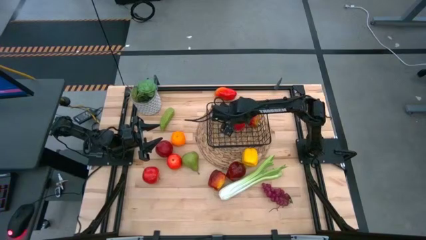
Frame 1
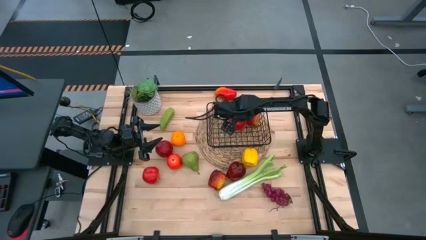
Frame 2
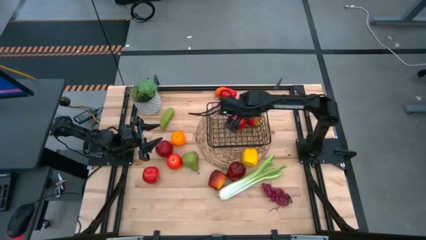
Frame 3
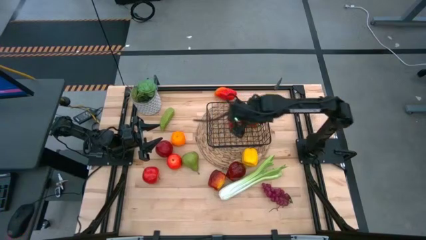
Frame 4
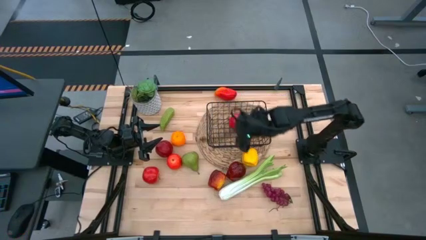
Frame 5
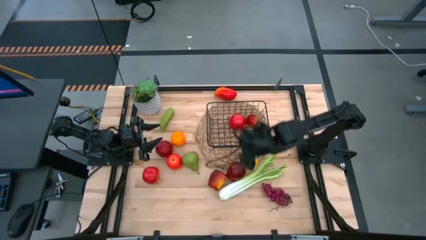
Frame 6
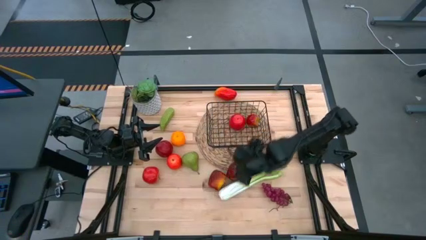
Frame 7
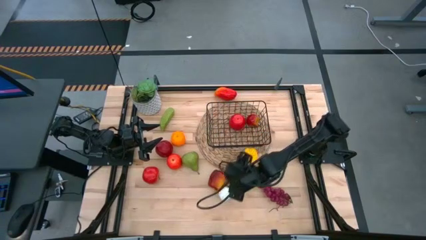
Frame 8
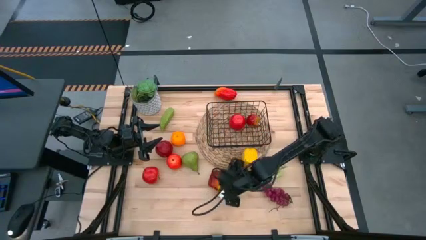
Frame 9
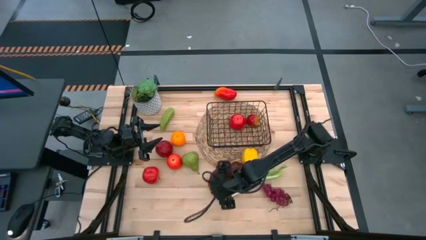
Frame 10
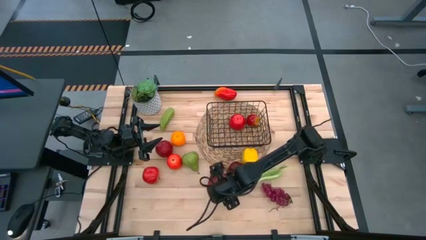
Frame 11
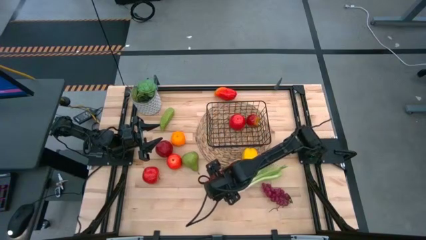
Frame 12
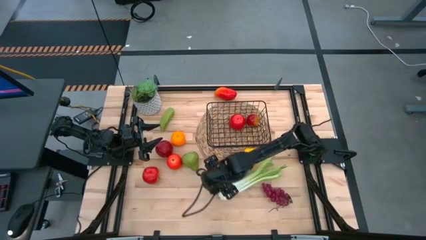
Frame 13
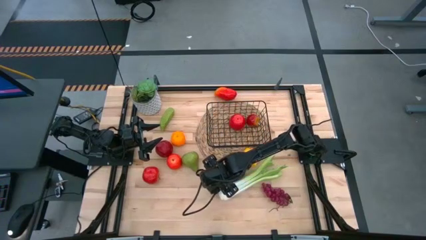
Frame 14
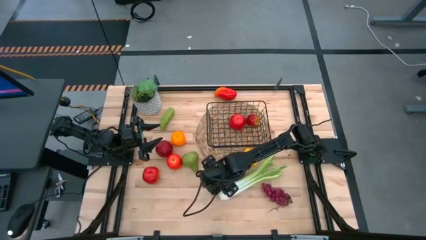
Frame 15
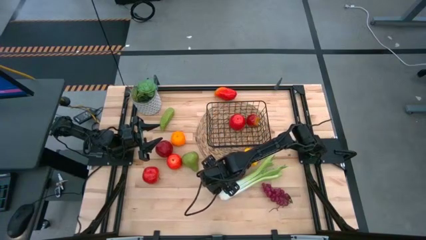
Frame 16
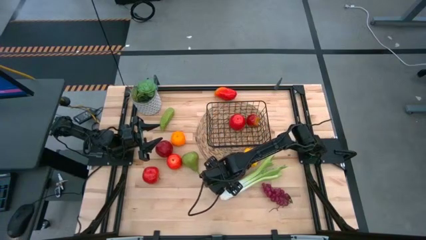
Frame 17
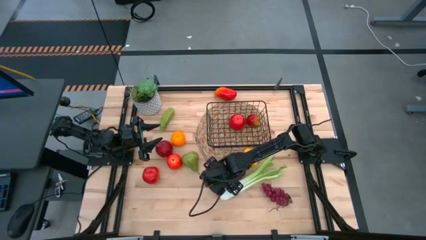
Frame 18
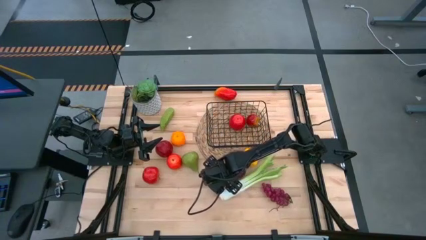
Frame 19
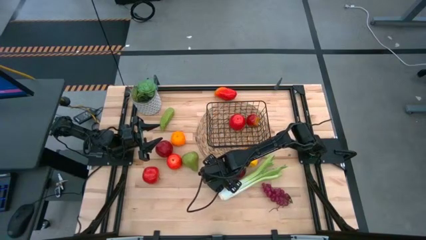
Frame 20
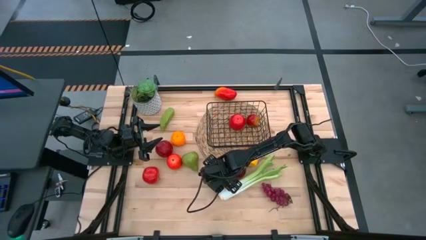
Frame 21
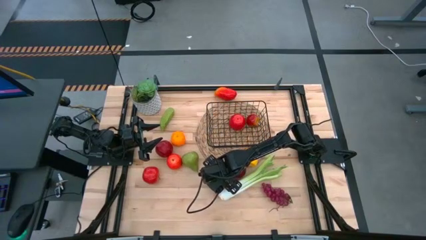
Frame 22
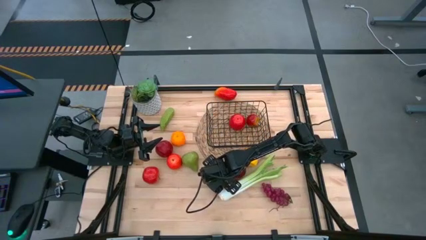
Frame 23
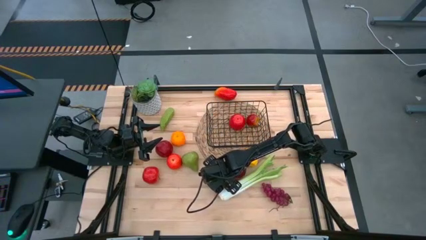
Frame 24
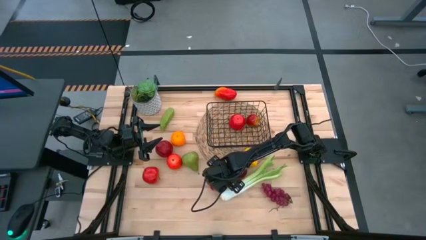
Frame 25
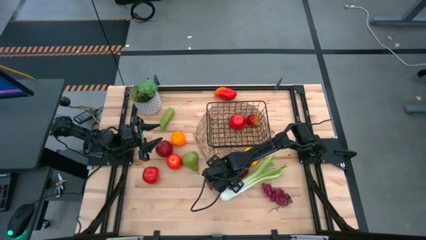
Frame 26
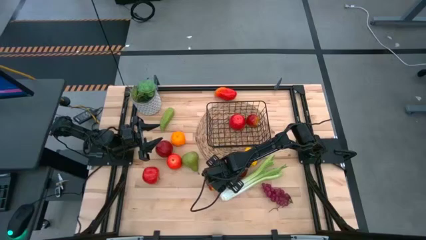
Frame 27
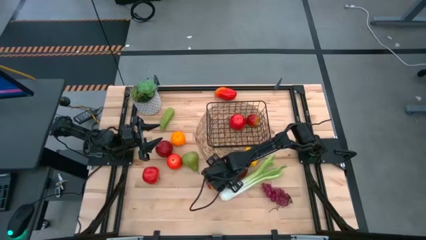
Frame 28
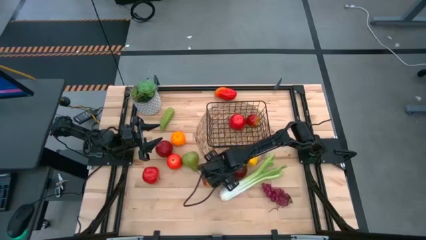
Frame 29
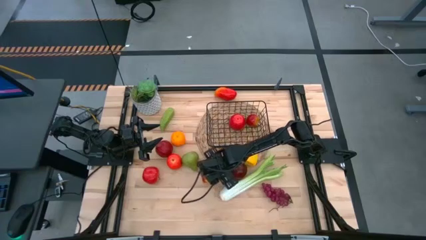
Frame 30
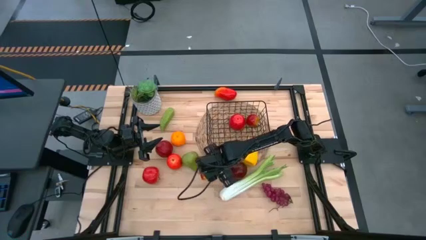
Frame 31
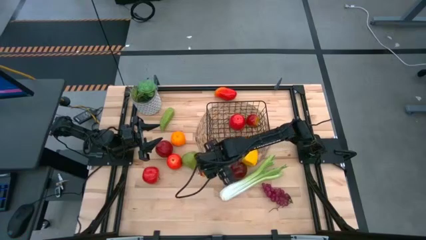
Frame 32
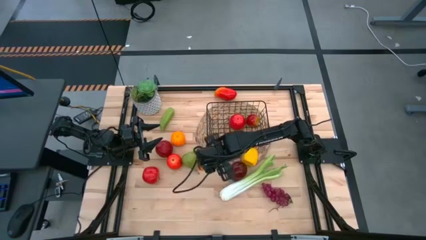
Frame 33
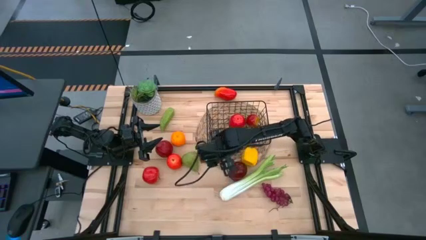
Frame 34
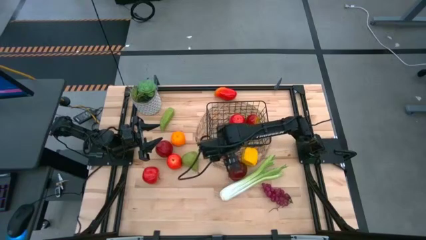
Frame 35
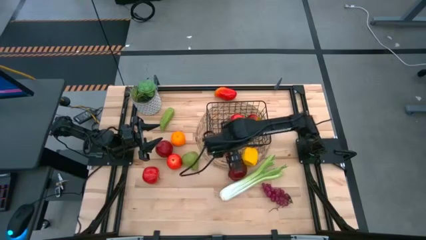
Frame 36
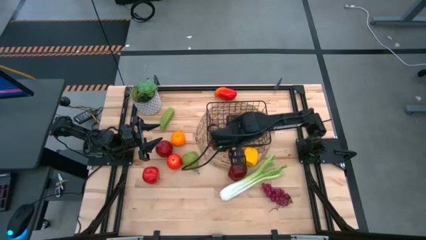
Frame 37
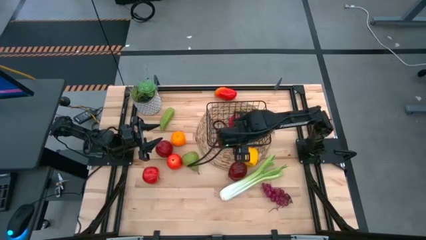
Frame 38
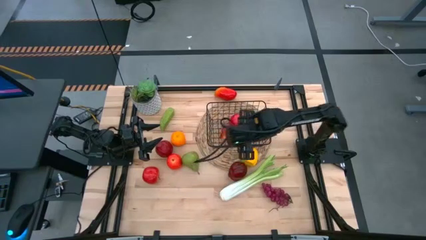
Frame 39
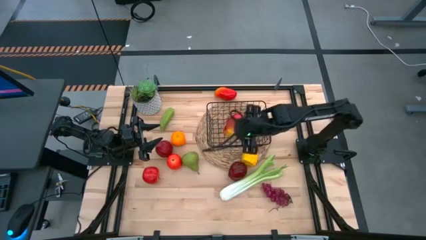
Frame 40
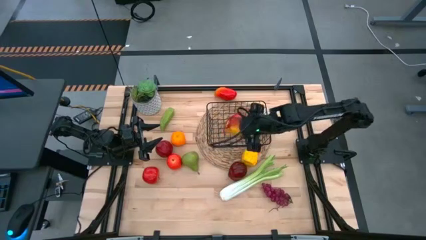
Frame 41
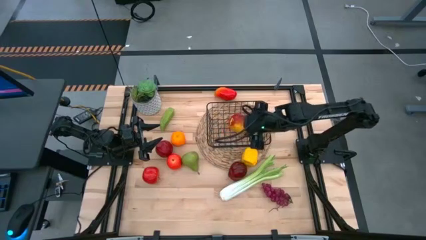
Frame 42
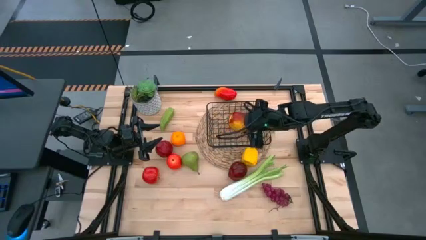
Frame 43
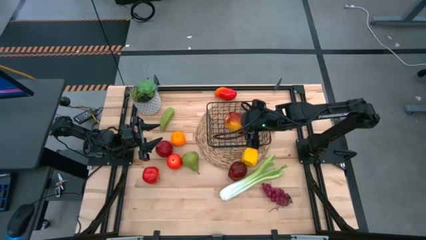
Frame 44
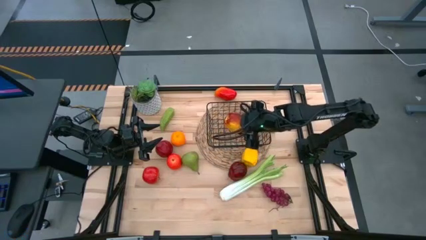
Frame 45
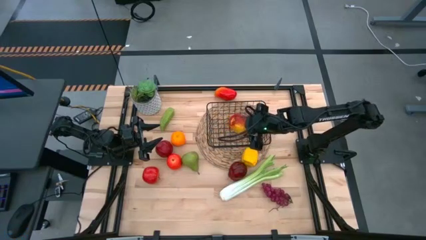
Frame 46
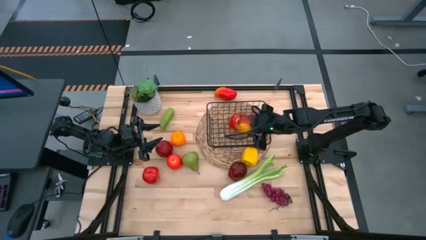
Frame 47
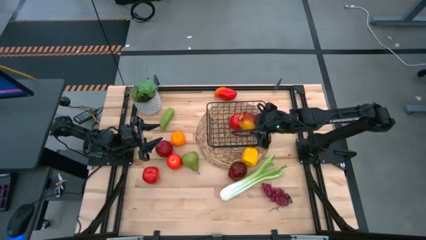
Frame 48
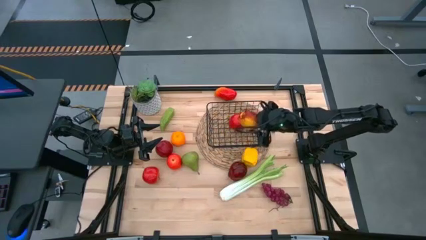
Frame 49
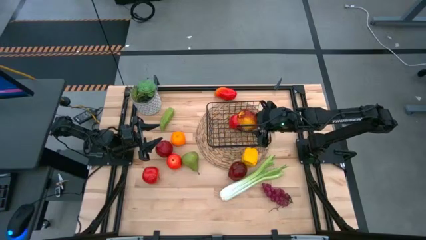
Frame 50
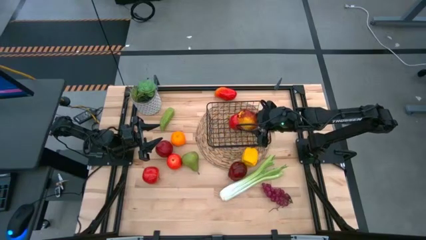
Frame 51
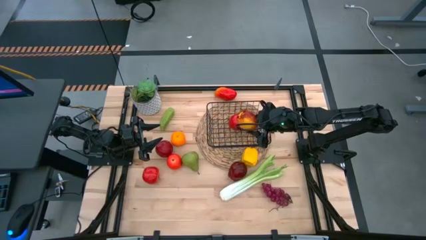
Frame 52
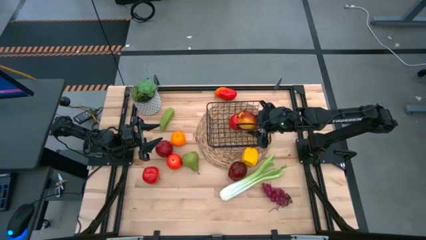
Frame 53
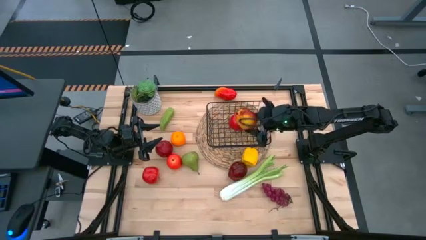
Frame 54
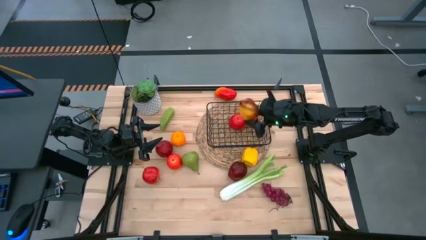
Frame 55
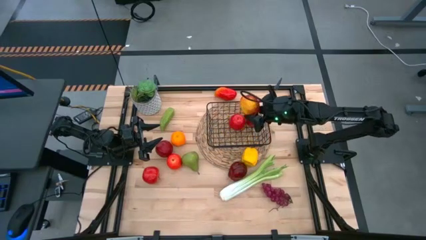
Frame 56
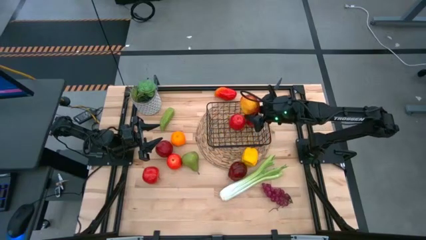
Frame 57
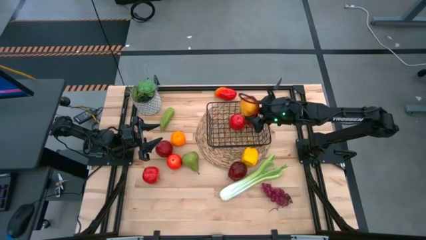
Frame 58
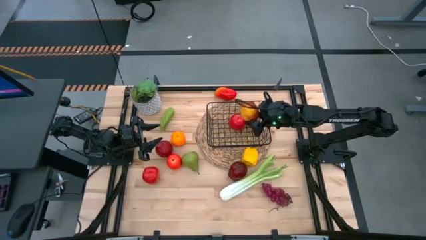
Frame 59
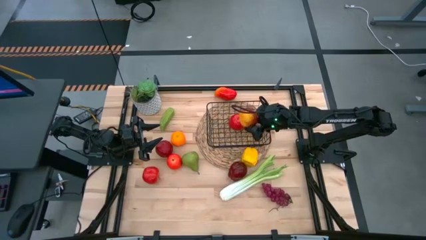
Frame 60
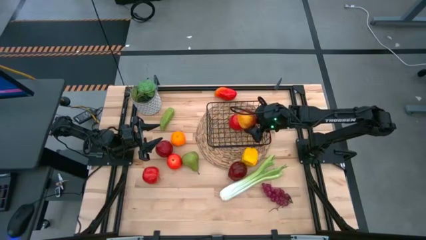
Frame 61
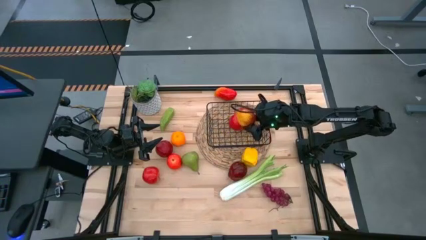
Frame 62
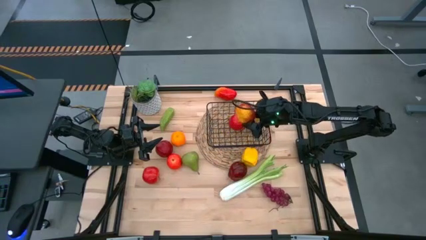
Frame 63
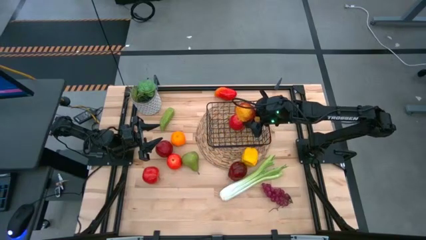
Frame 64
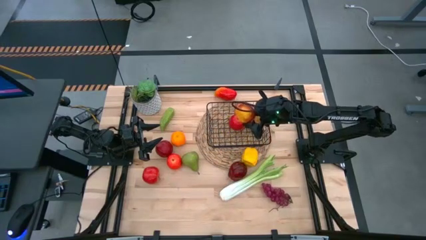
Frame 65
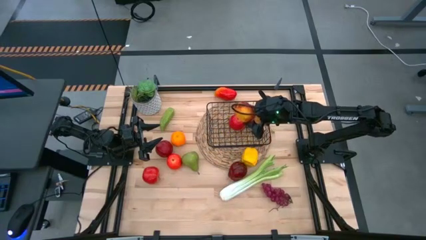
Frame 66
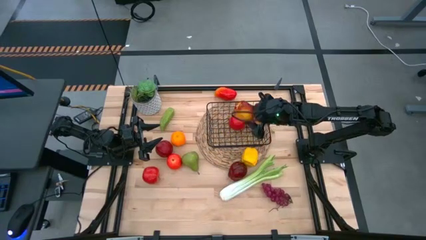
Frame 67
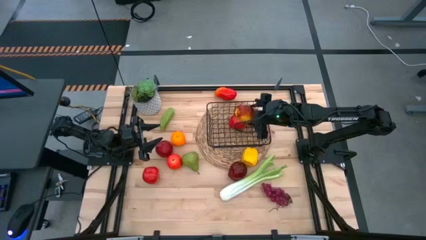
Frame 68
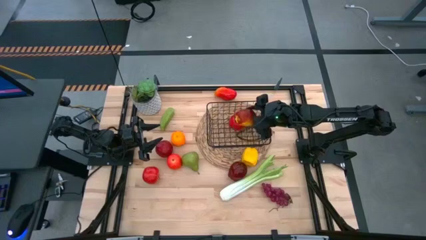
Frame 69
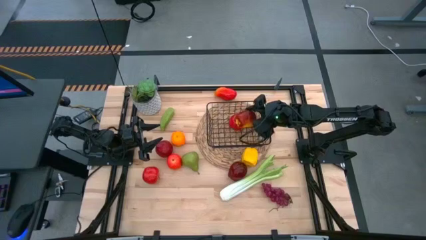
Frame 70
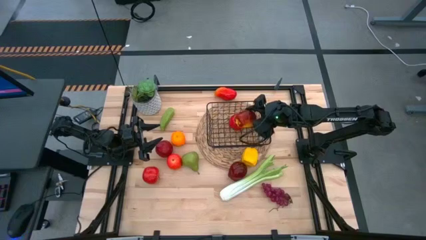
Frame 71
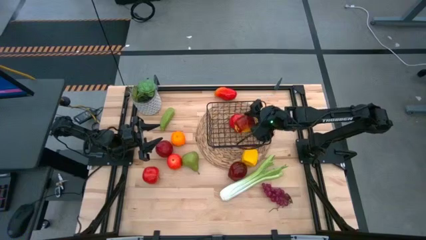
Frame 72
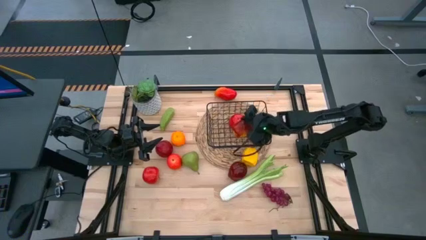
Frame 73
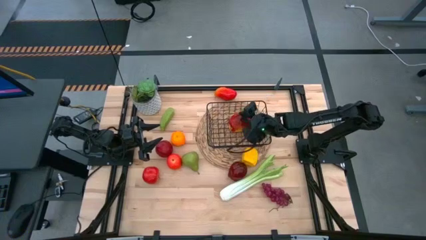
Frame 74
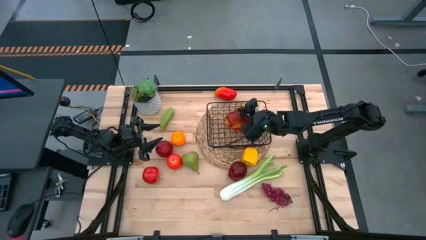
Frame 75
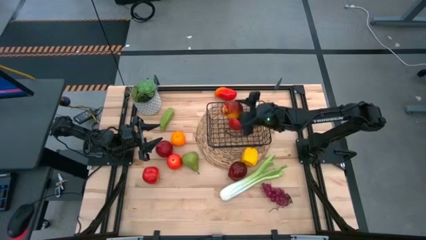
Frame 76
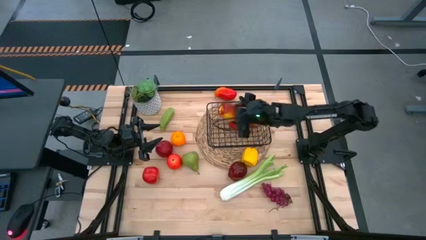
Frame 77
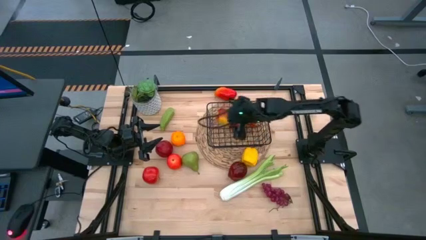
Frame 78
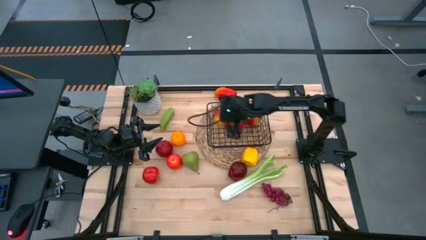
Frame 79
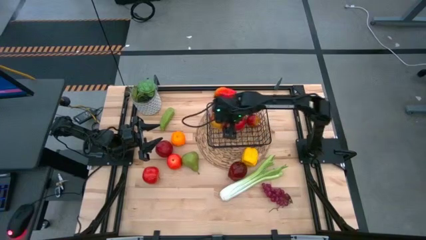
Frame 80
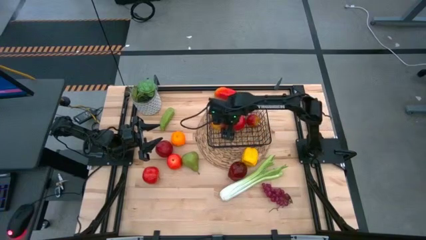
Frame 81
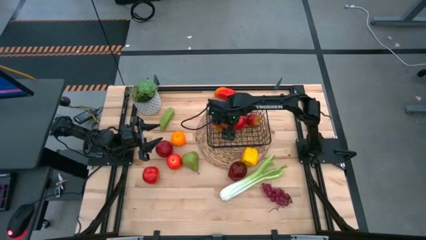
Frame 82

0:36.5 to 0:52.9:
Task: Build produce basket
Put the dark apple into the black wire basket

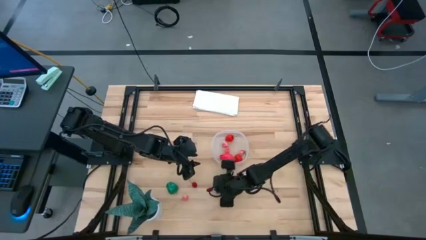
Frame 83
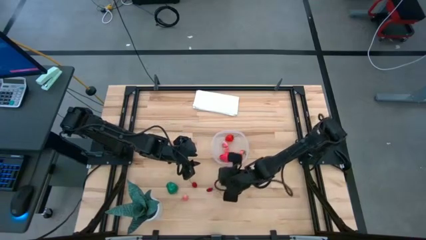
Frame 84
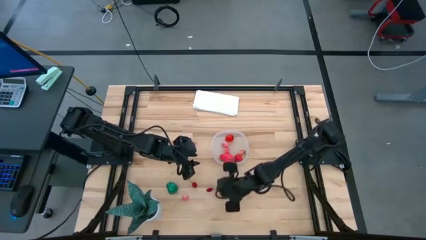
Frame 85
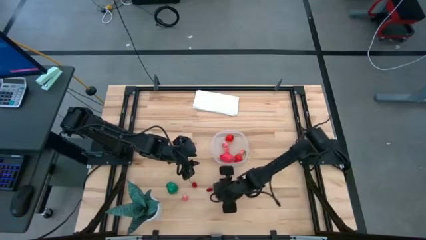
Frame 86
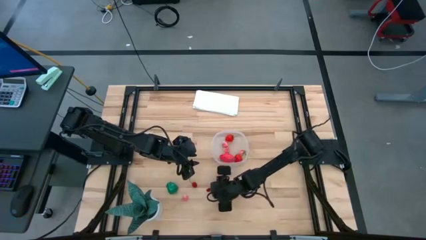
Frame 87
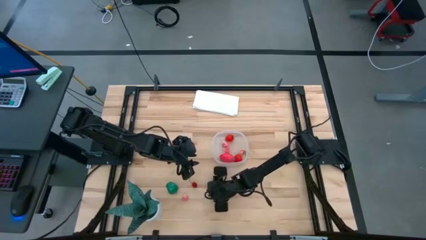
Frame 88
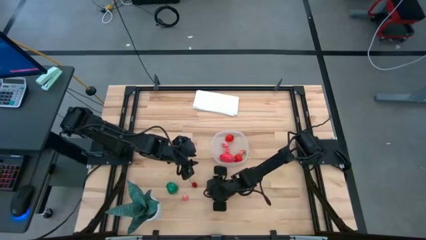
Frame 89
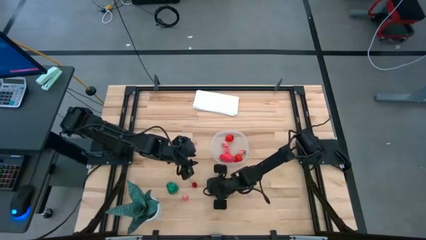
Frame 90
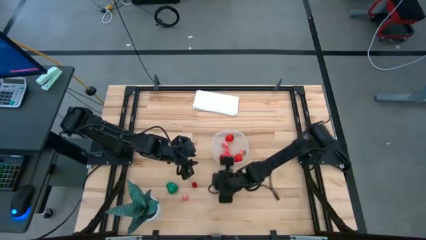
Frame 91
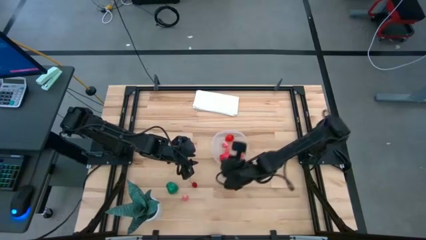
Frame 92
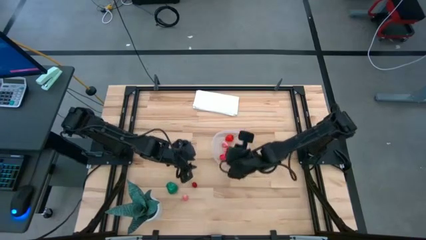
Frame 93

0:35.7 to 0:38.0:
Task: Pick and placing Produce into tupperware
Put the red cherry into the transparent bin
